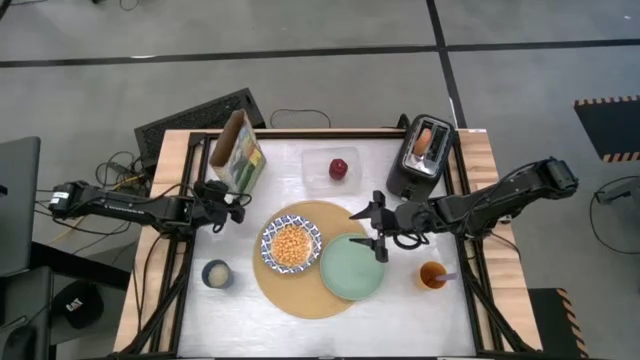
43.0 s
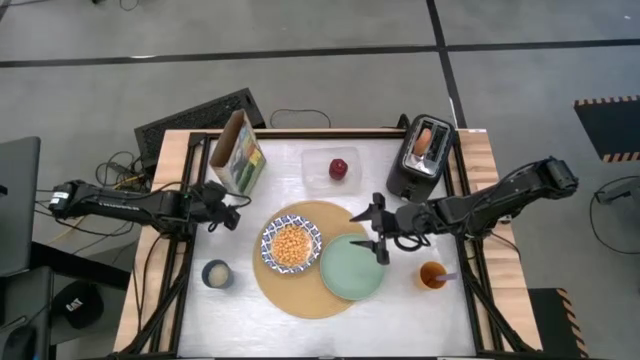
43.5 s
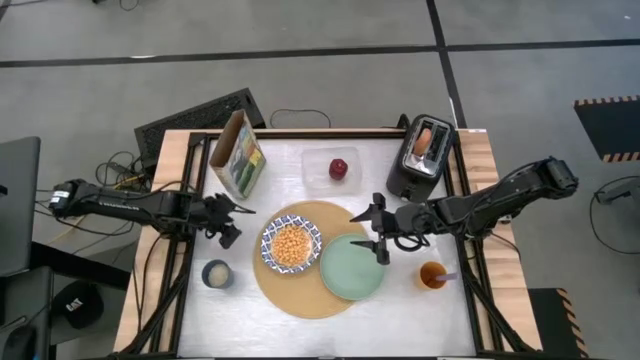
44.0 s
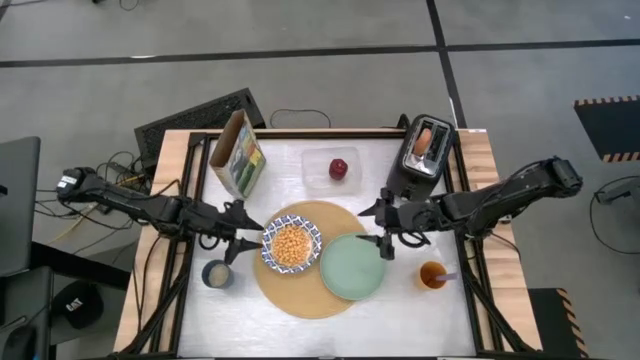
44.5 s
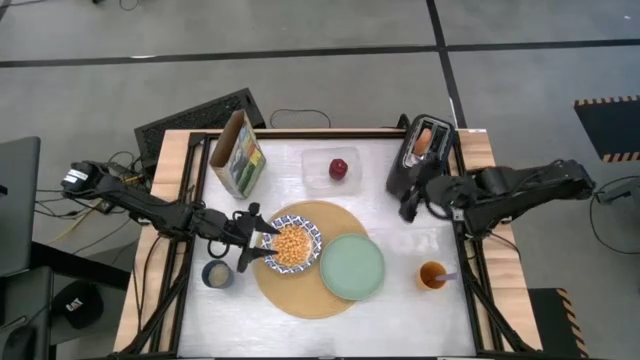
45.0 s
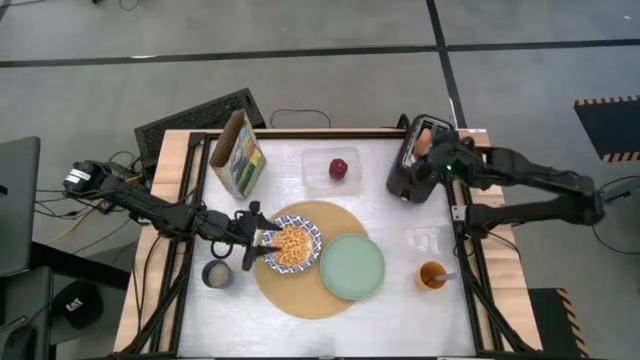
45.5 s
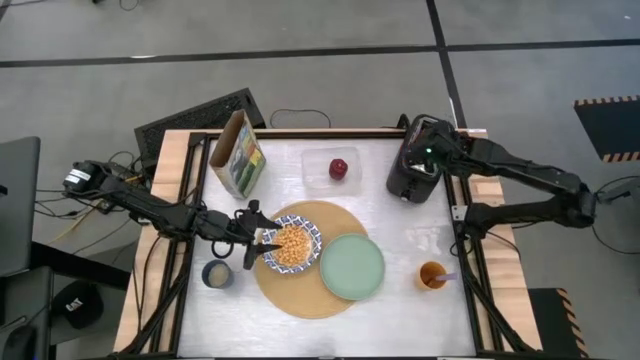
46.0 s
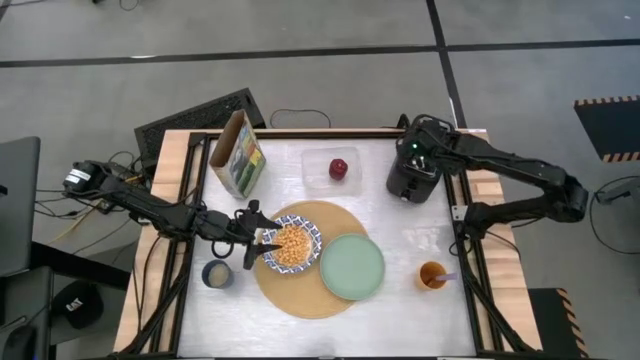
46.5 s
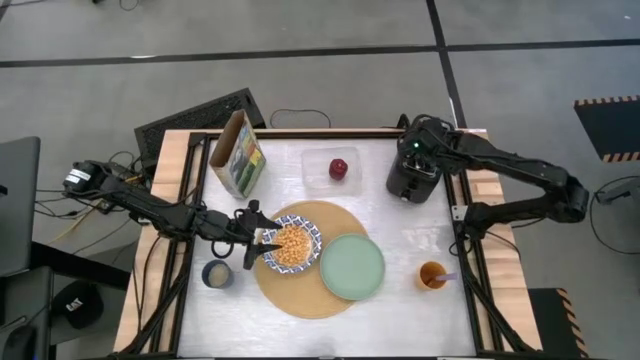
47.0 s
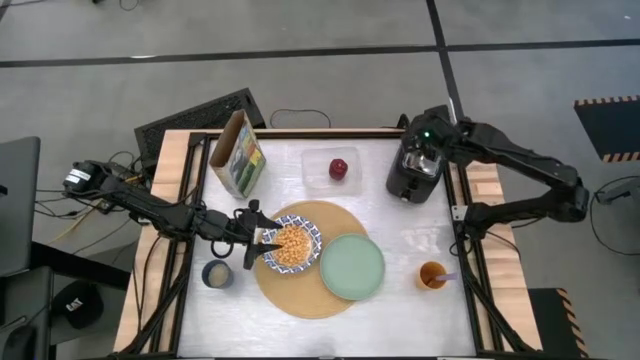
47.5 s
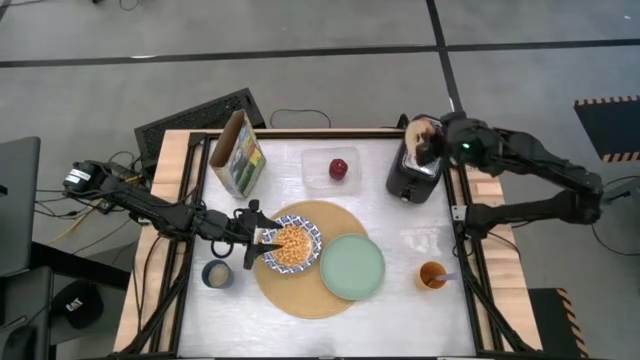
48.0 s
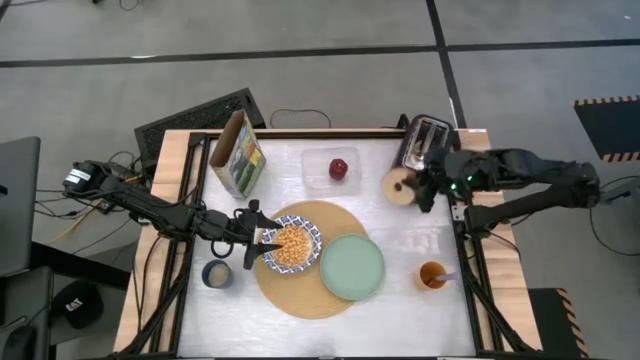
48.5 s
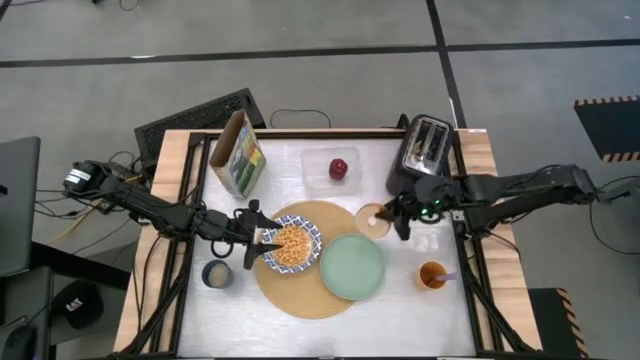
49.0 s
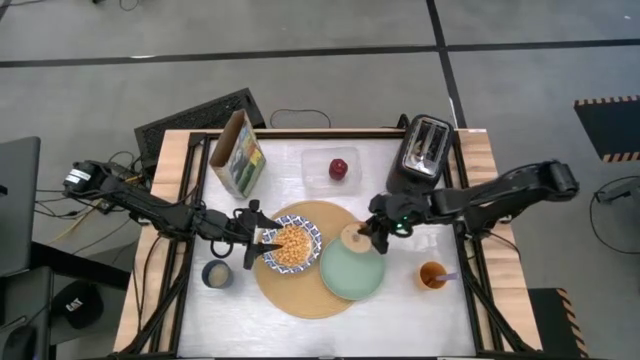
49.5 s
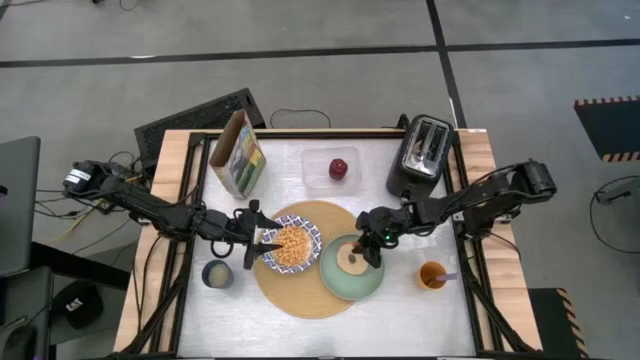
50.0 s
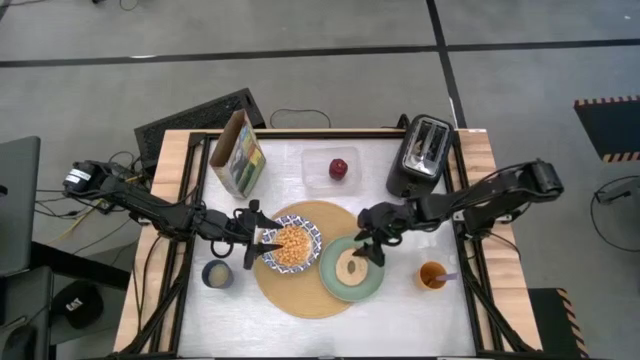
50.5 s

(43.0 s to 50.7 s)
Task: Arrange a breakfast setting
Put the bagel on the green plate

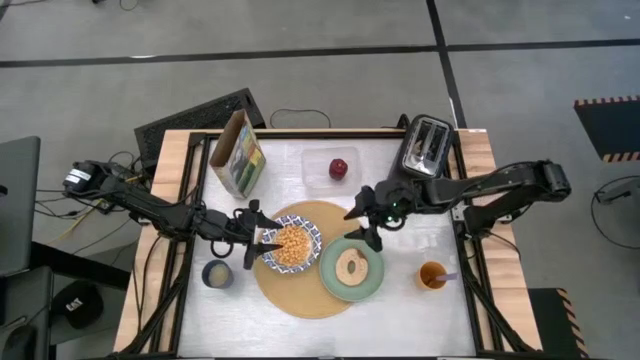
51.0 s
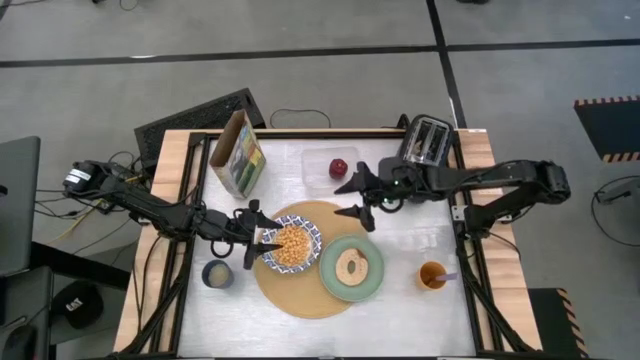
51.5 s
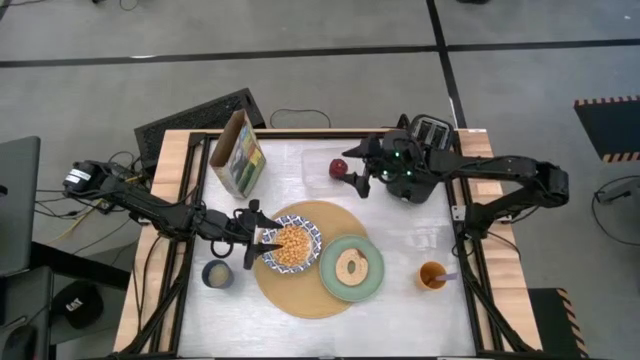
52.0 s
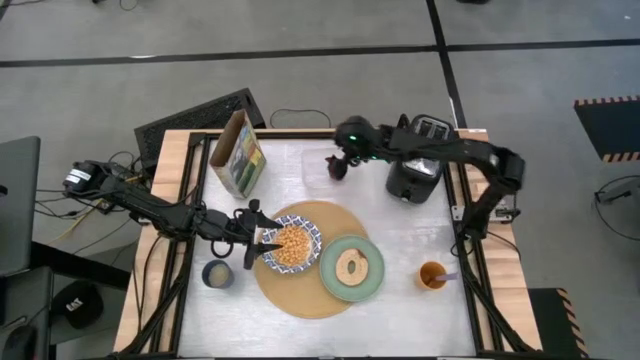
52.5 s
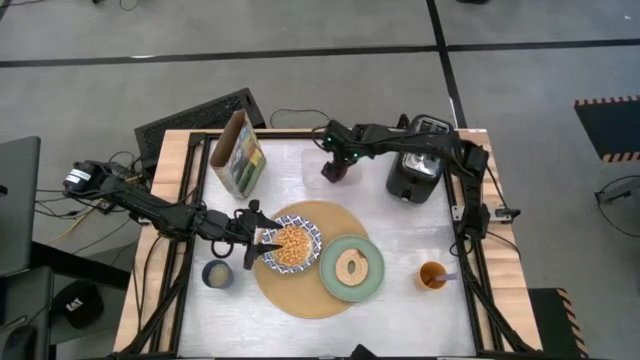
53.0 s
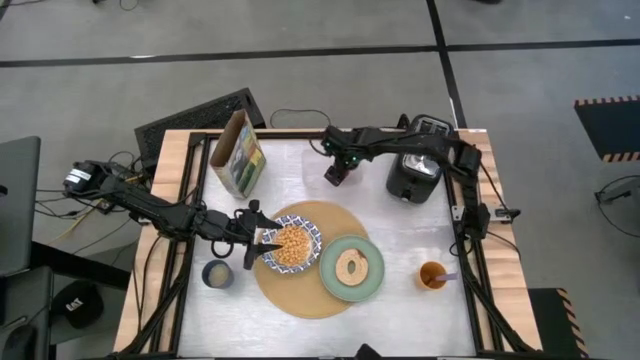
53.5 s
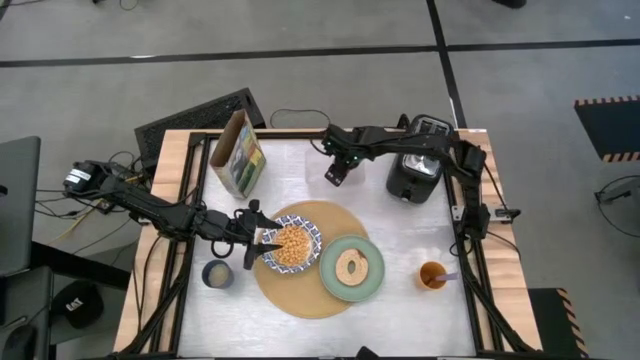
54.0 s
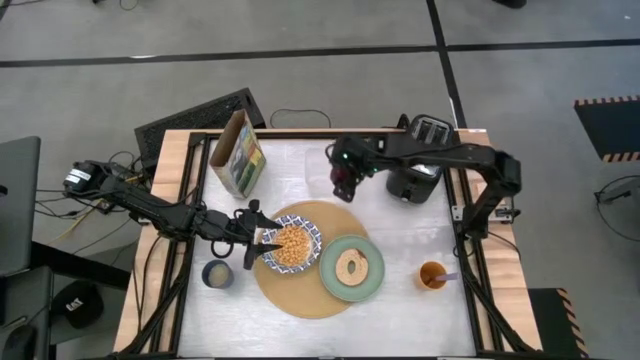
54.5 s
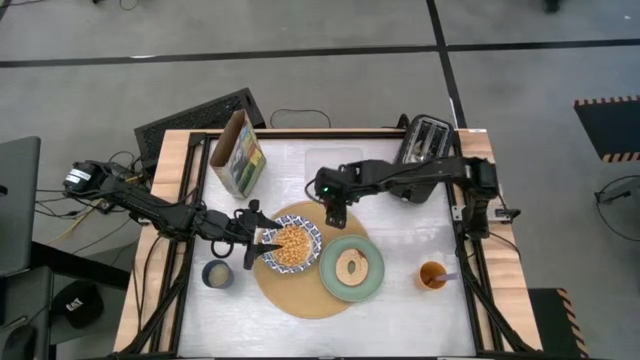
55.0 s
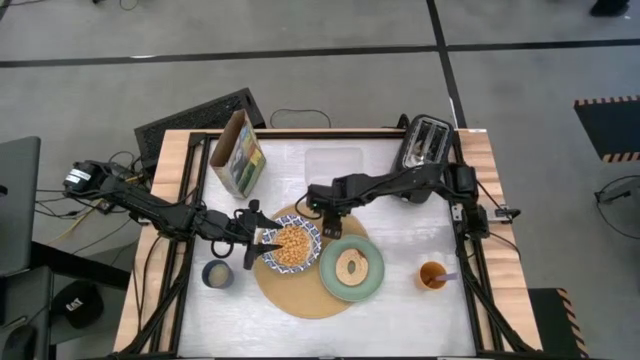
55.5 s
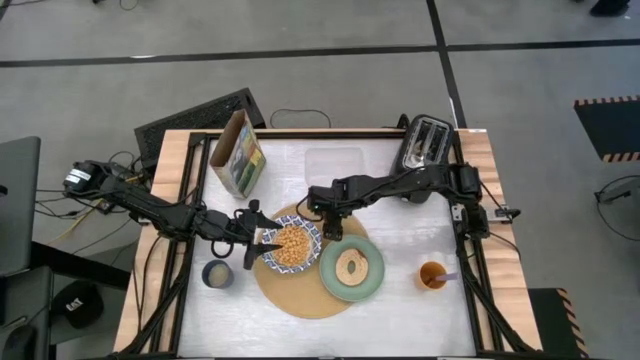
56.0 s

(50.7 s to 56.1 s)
Put the red apple to the top of the bowl and plate on the brown table mat

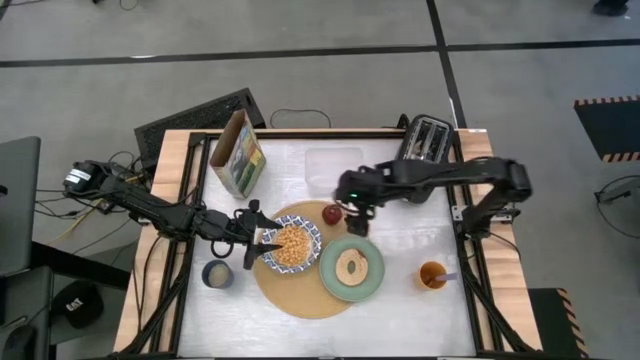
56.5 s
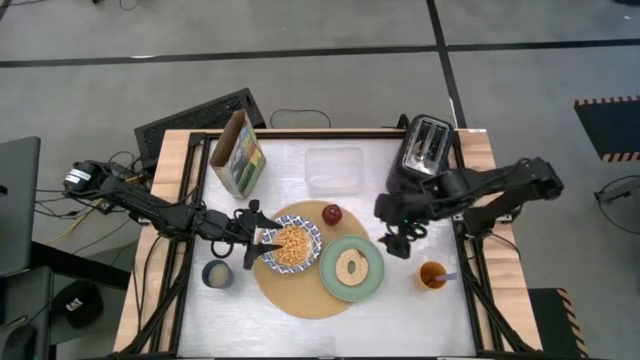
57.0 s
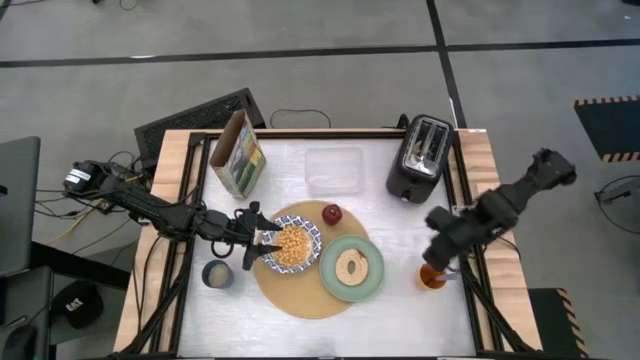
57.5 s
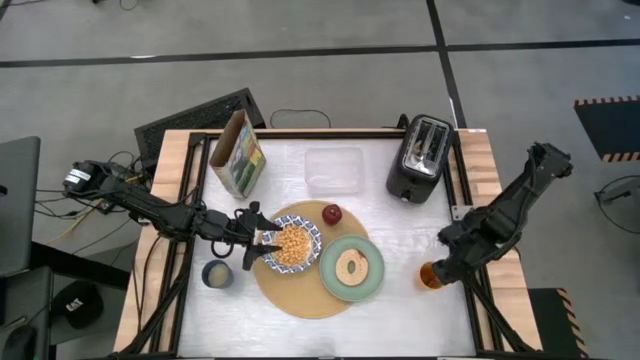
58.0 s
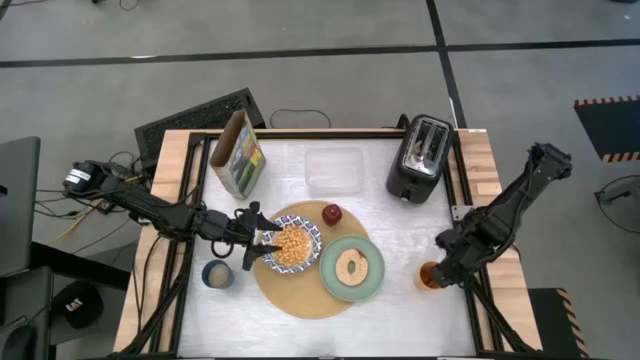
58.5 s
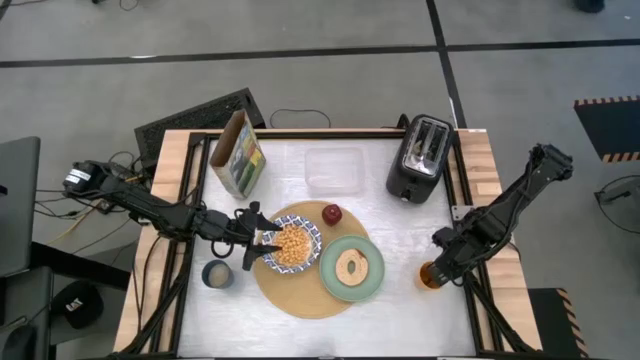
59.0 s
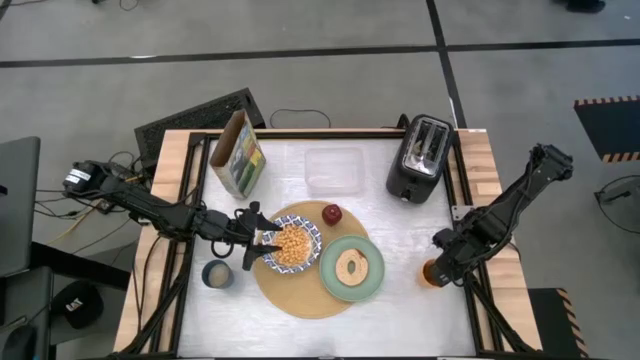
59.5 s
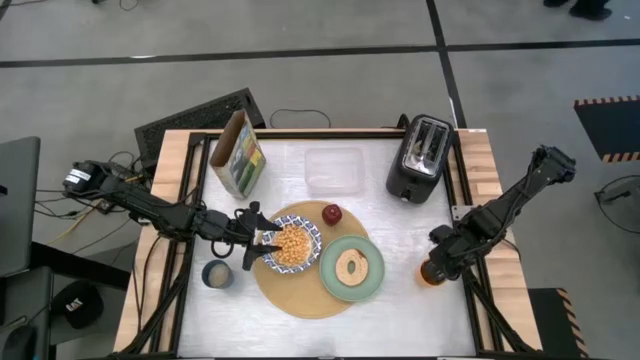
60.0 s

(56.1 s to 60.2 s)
Put the purple spoon on the left side of the brown table mat

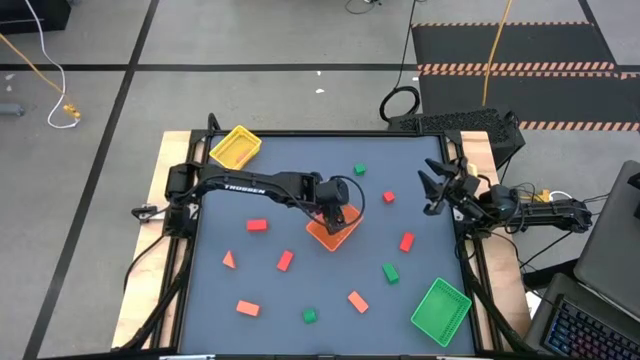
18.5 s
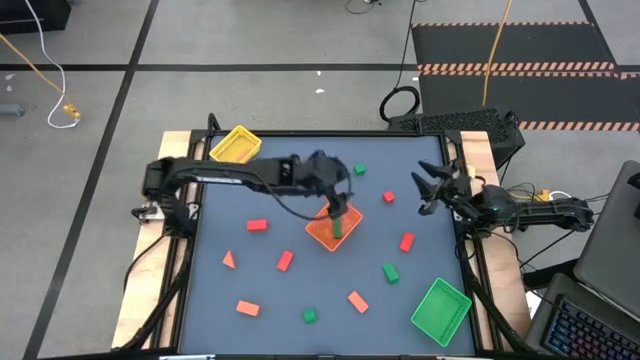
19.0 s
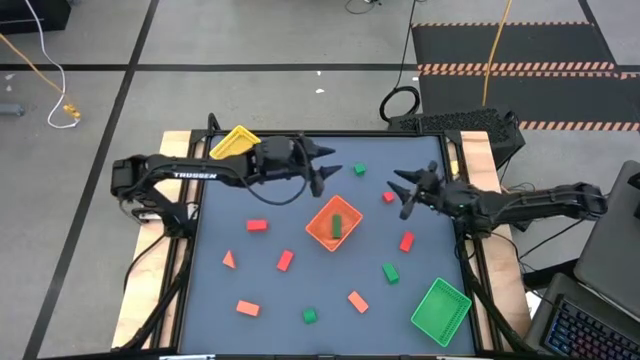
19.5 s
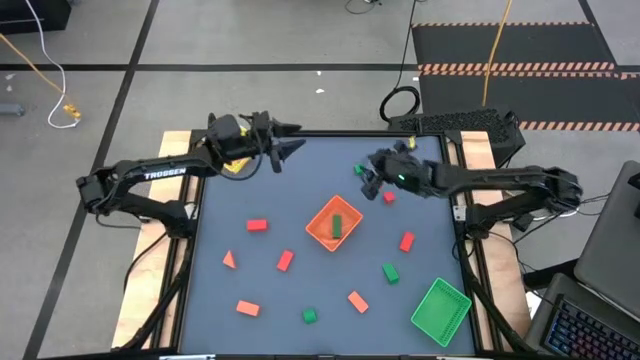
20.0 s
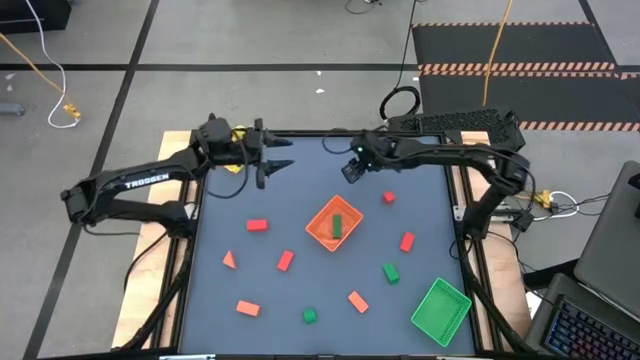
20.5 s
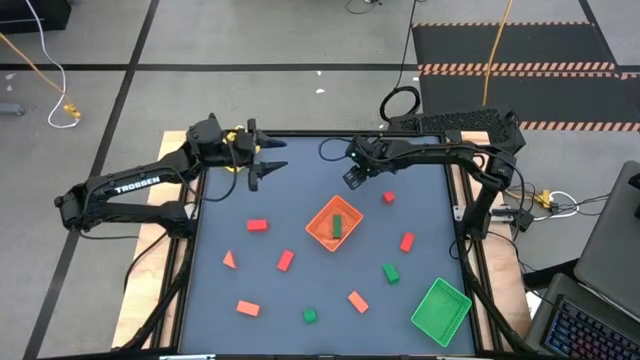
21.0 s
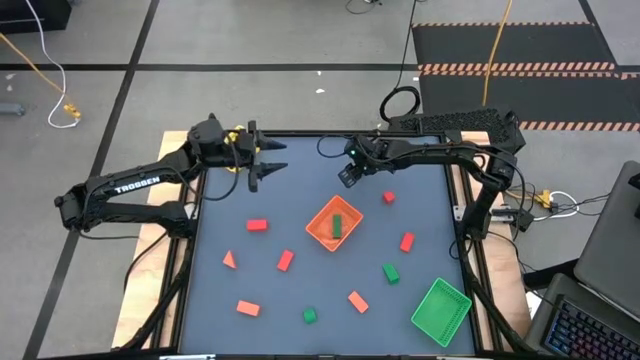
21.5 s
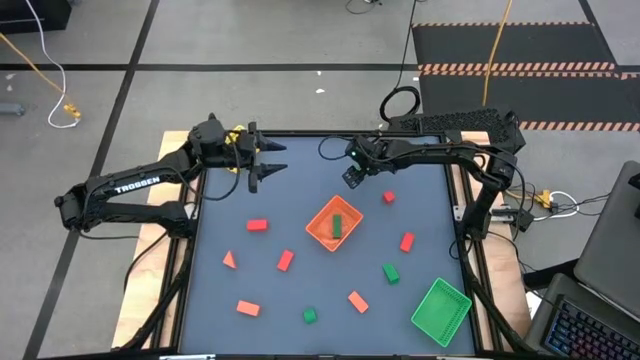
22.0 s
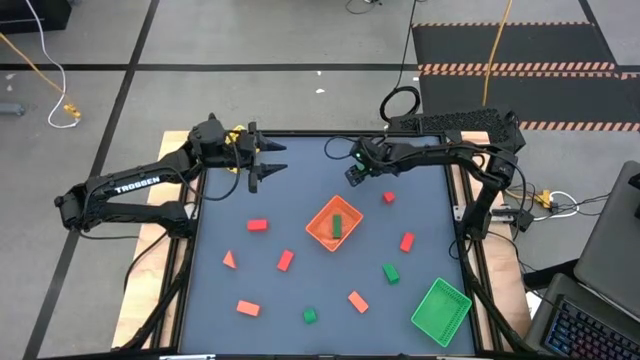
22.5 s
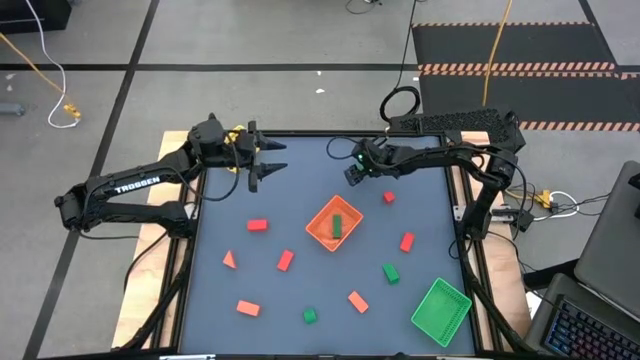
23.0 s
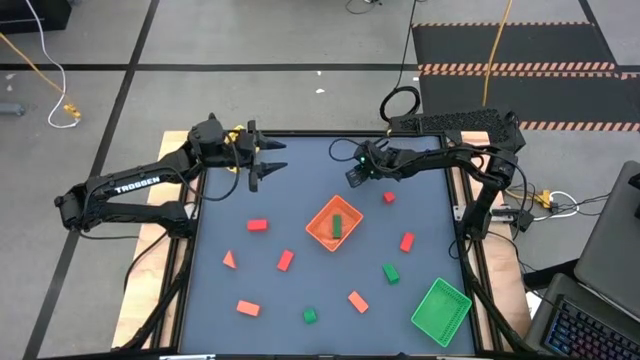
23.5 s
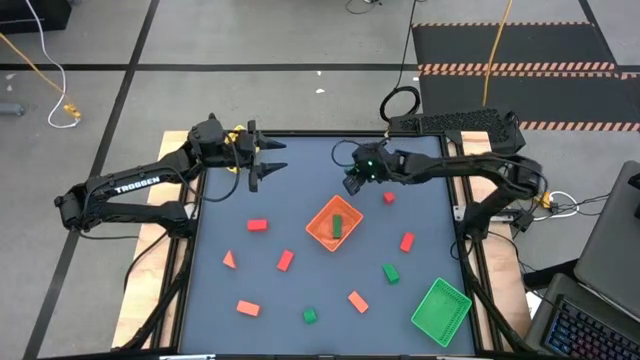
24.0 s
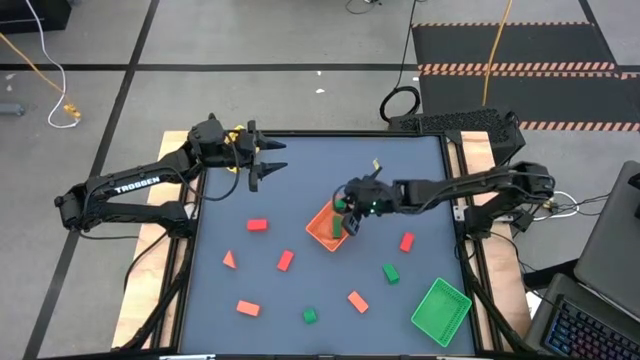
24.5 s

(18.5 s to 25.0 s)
Task: Sort & place blocks by color
Put the green block into the orange bin
